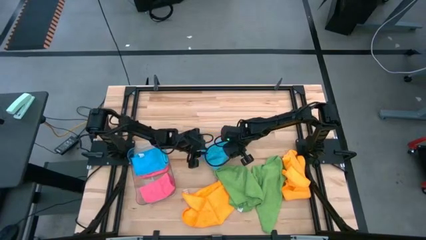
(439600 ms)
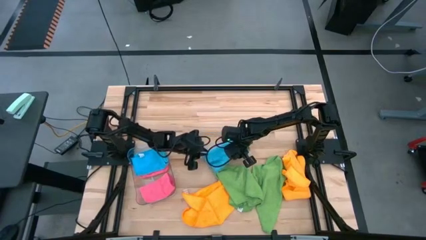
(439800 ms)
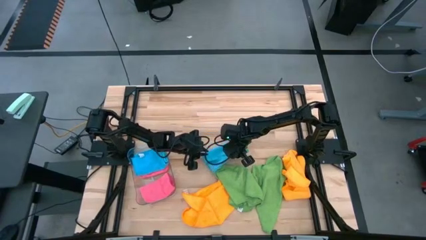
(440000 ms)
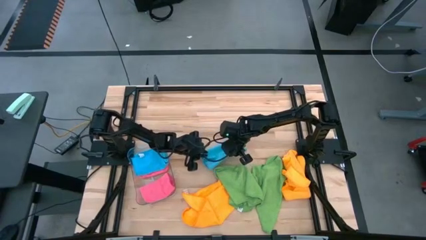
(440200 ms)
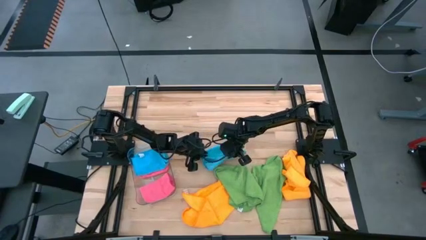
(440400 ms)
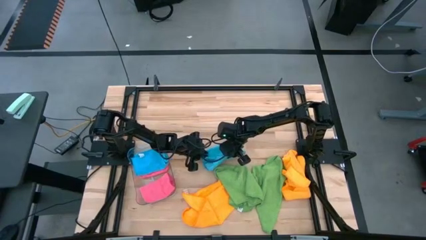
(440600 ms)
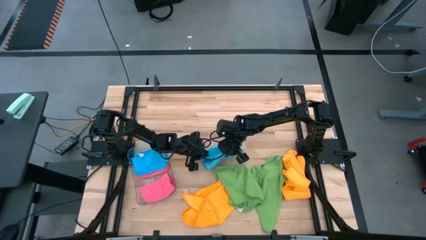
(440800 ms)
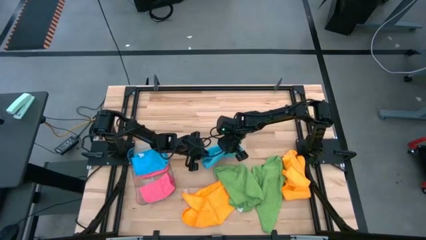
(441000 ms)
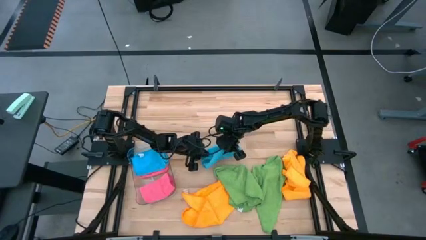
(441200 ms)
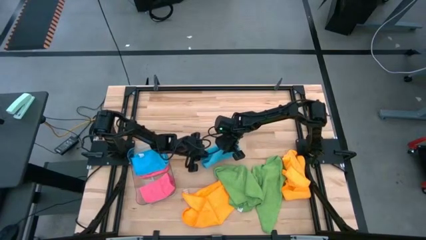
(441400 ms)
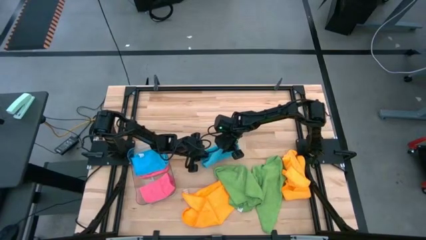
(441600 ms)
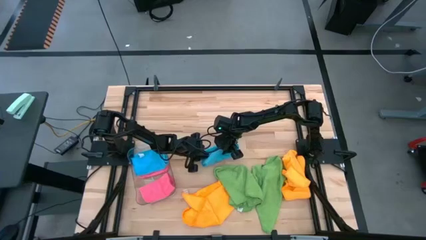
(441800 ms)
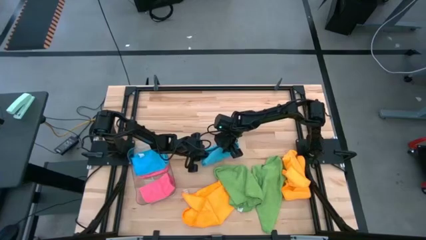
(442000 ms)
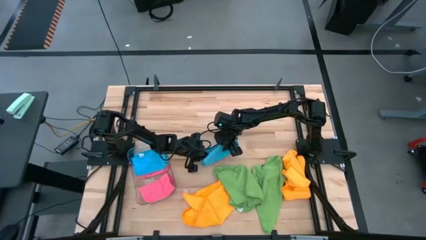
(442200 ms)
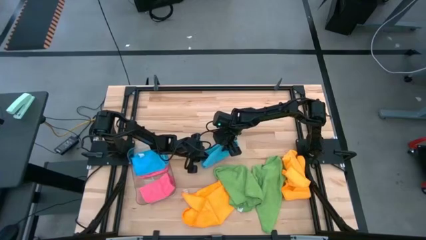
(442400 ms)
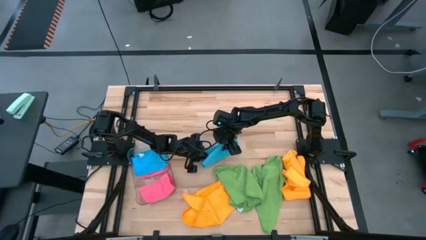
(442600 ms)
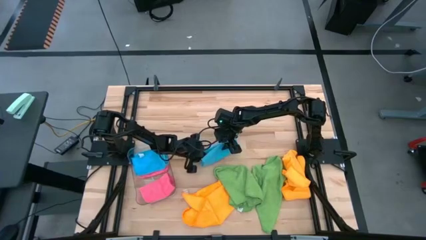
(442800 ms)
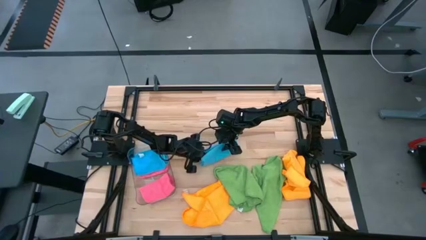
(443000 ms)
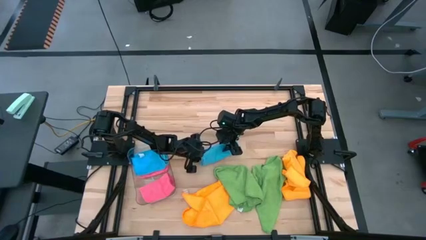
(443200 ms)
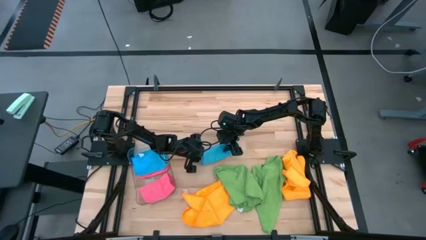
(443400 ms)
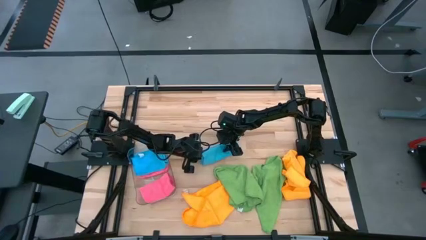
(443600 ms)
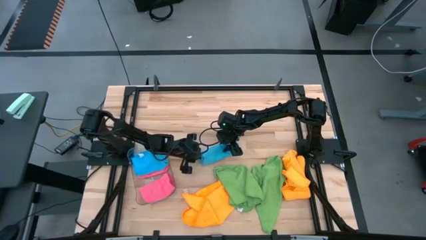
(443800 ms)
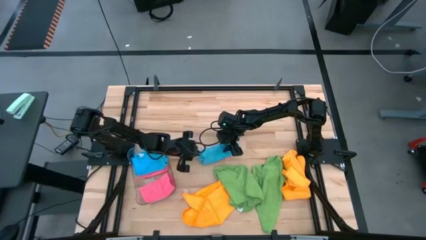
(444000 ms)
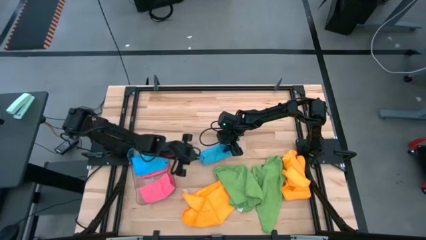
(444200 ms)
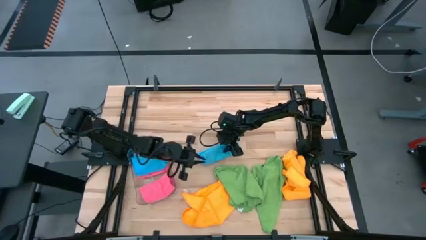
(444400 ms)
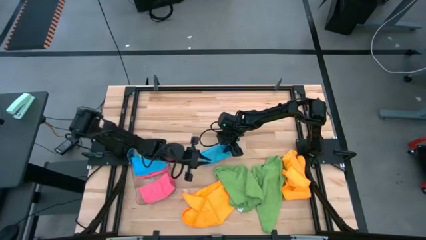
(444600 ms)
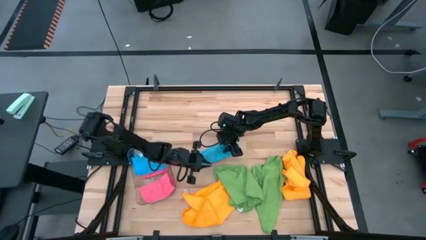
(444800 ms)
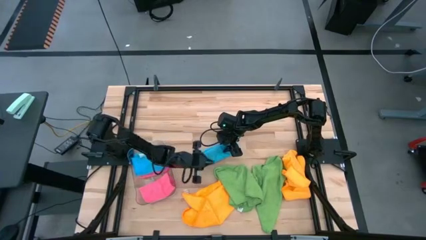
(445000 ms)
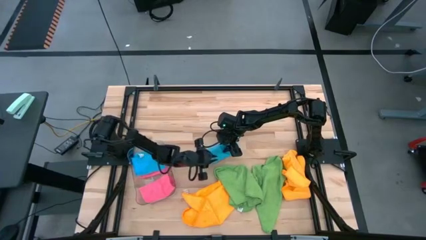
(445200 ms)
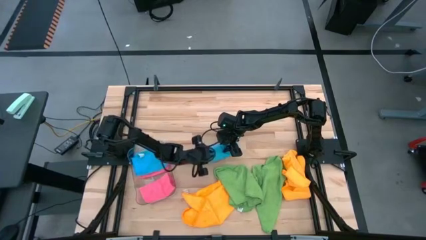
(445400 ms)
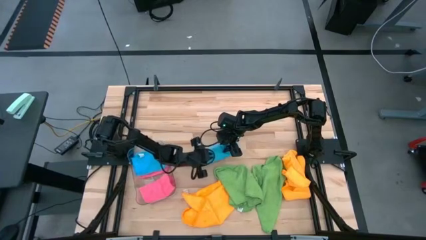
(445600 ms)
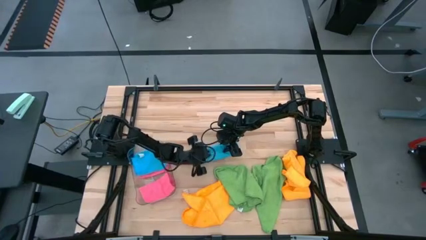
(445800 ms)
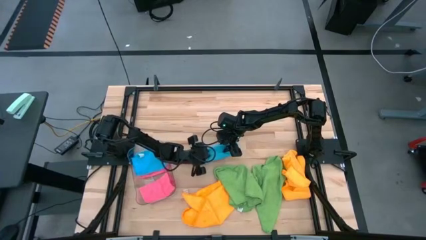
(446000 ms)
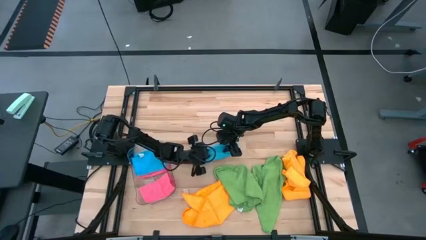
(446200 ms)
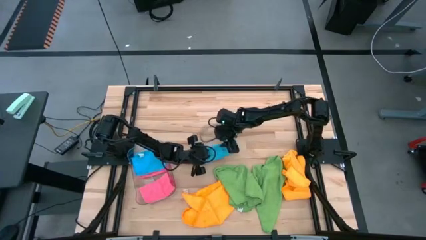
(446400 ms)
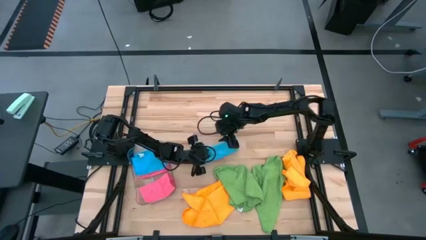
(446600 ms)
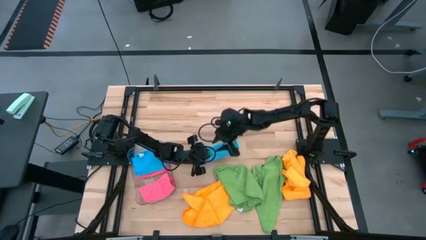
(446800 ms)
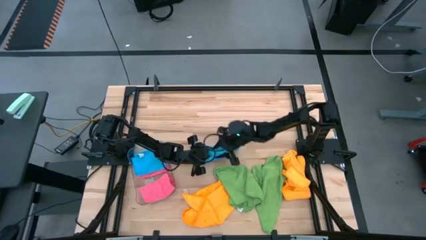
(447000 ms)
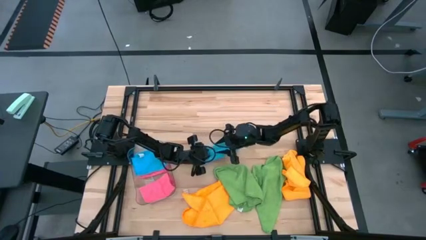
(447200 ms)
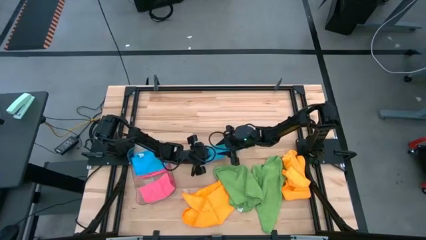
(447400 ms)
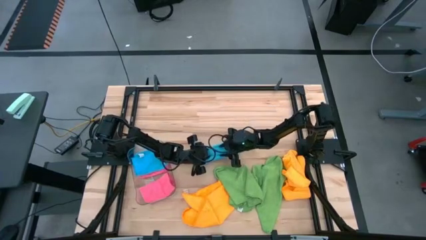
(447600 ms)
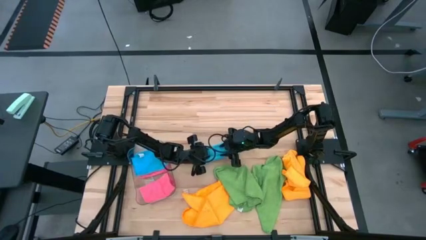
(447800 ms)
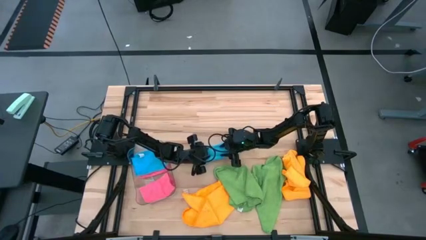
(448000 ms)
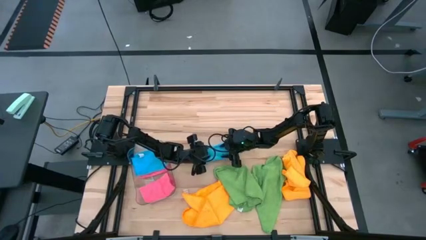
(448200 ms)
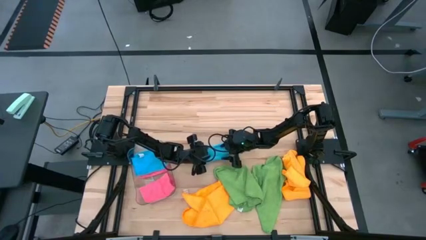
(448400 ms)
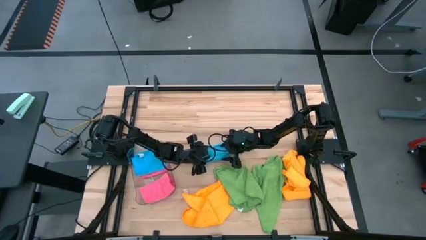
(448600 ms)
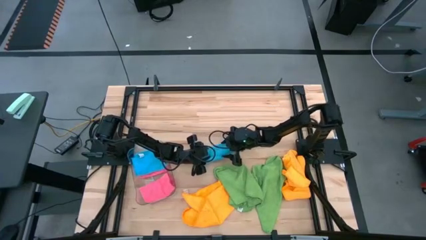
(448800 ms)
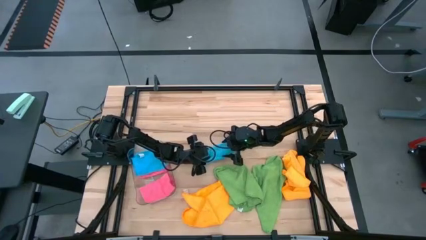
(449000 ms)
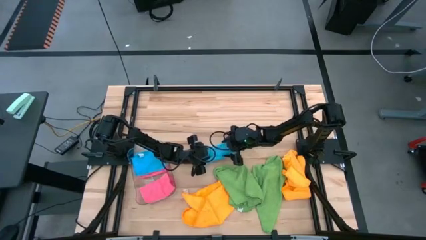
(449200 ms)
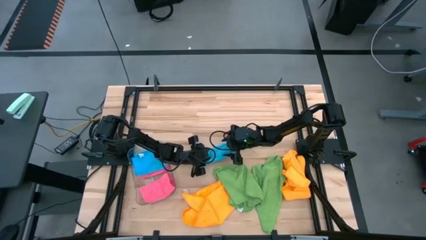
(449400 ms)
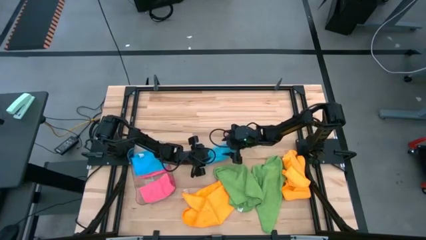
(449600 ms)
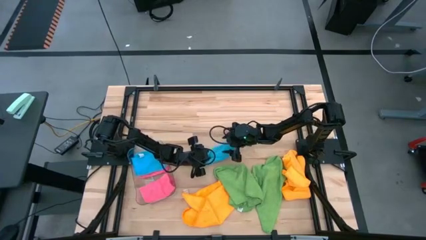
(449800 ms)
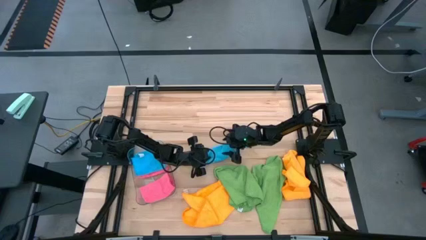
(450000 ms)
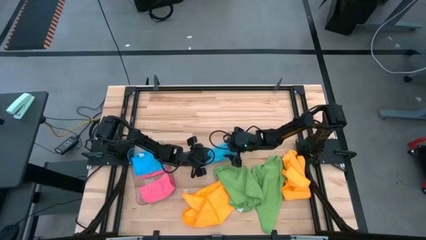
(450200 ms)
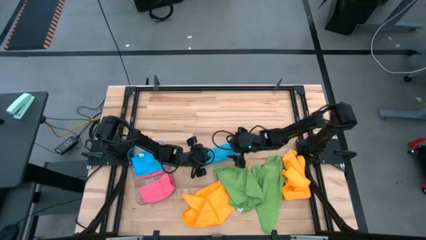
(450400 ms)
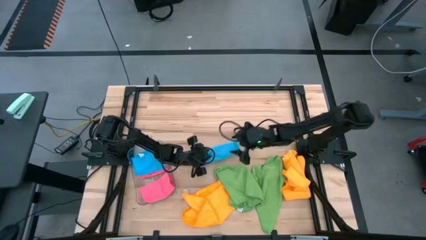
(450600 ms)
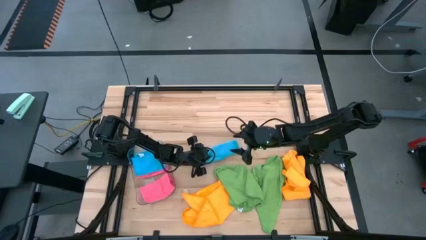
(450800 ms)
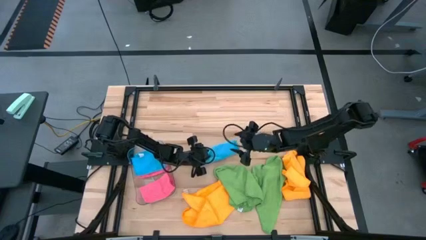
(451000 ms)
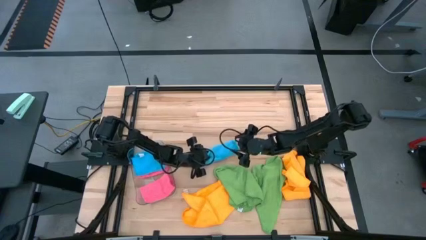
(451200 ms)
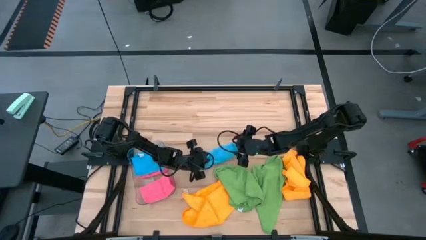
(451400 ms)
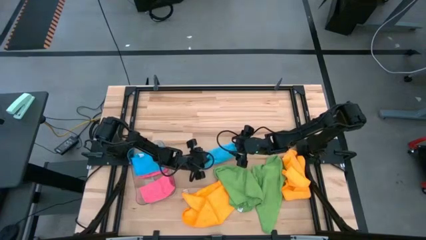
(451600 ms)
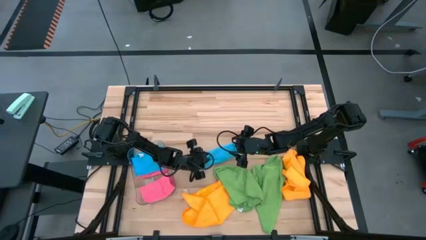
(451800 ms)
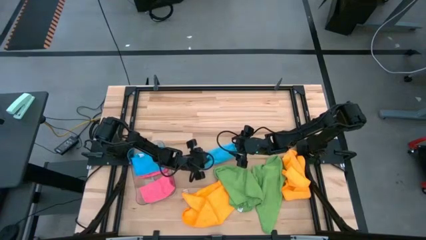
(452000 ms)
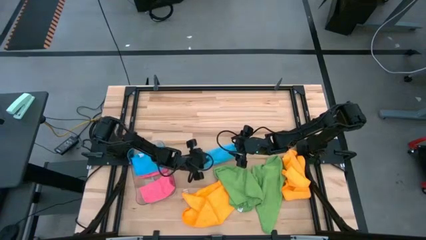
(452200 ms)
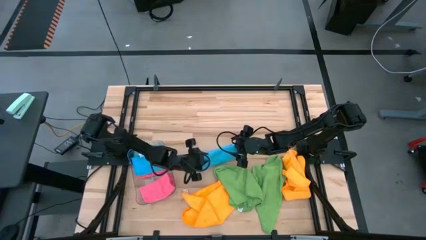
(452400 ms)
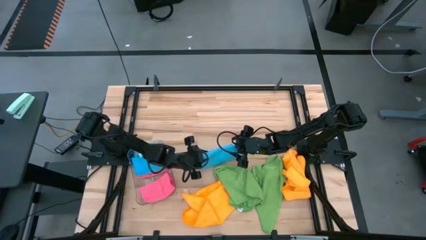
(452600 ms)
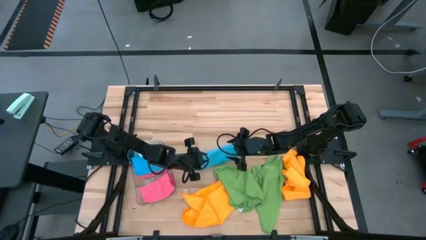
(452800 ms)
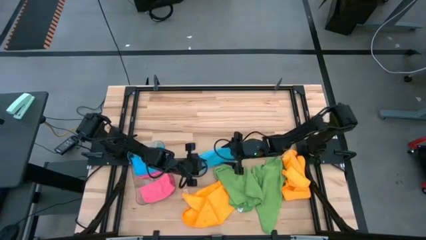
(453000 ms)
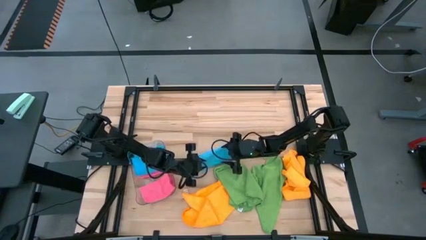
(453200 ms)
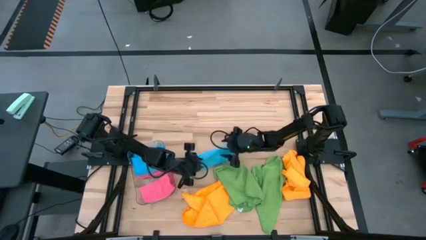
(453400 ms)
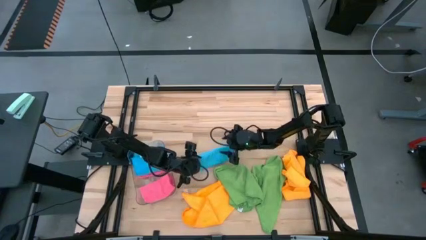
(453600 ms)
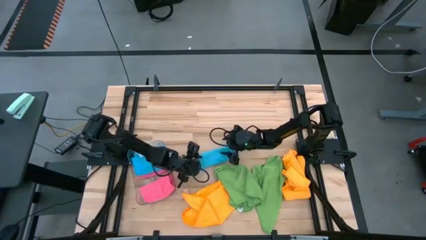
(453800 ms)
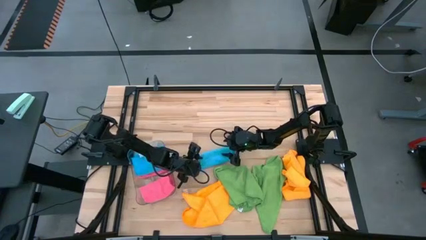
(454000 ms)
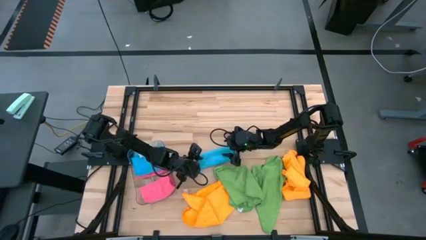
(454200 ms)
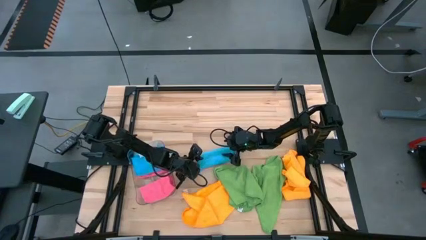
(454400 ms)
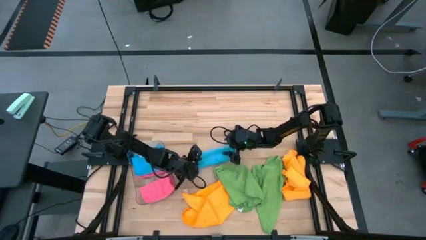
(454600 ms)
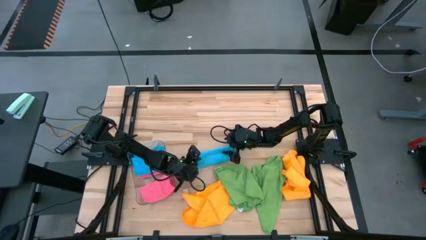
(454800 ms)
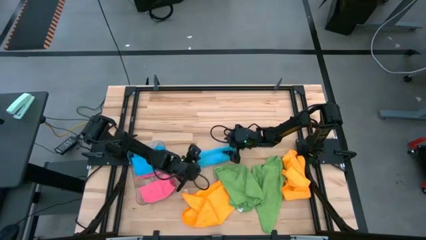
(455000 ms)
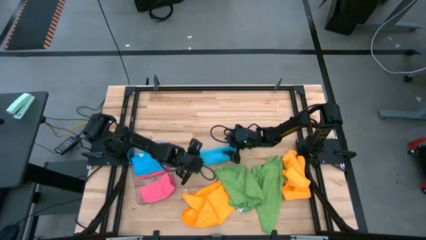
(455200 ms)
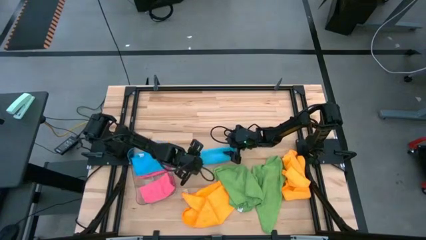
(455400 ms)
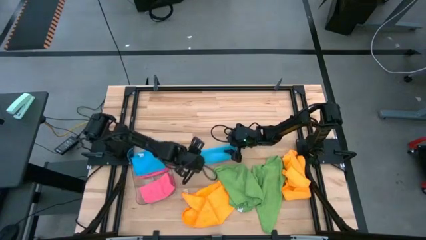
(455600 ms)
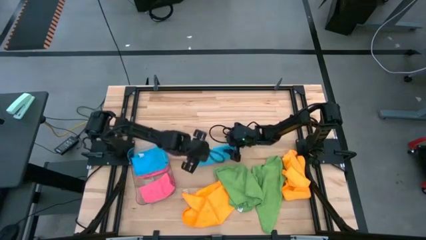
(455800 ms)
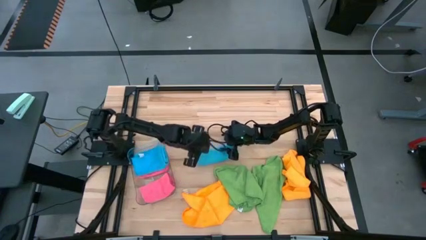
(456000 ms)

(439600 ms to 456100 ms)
Task: Fold microfiber towels
Fold the blue microfiber cloth
